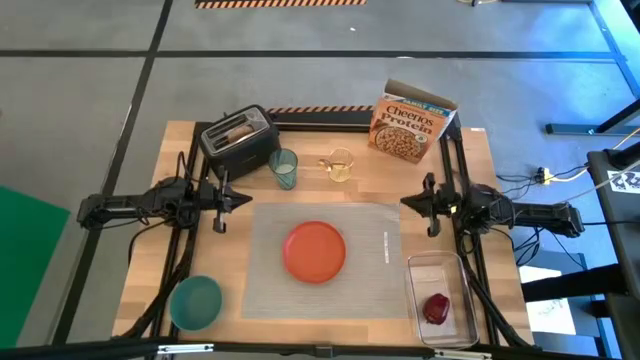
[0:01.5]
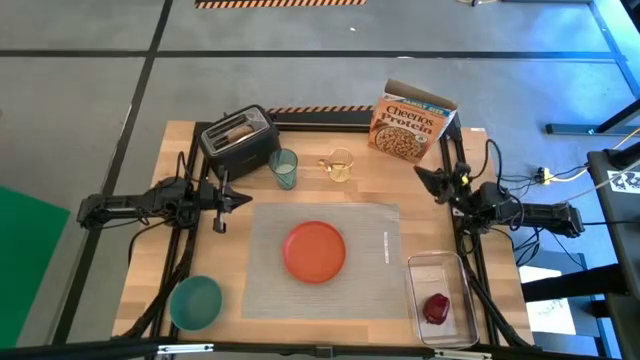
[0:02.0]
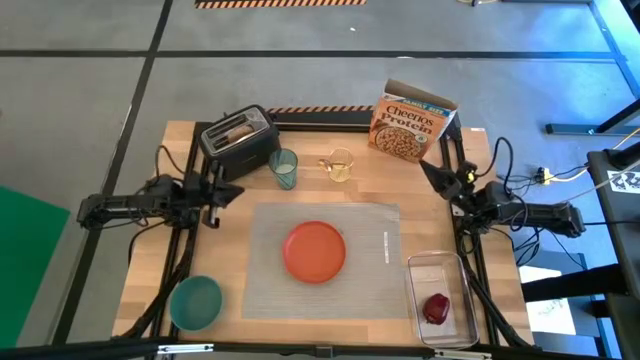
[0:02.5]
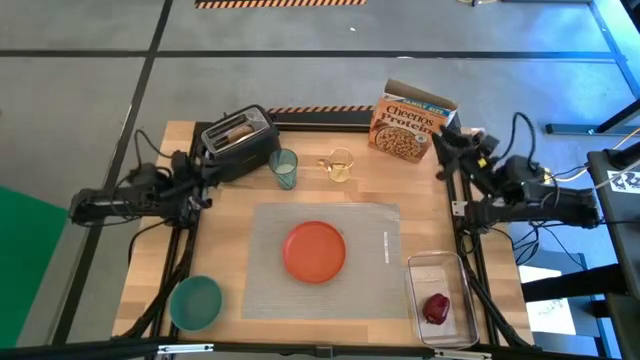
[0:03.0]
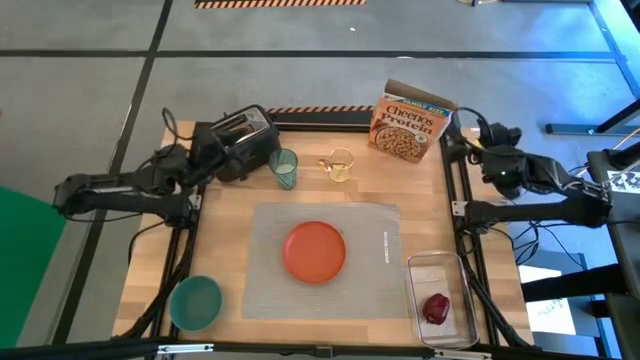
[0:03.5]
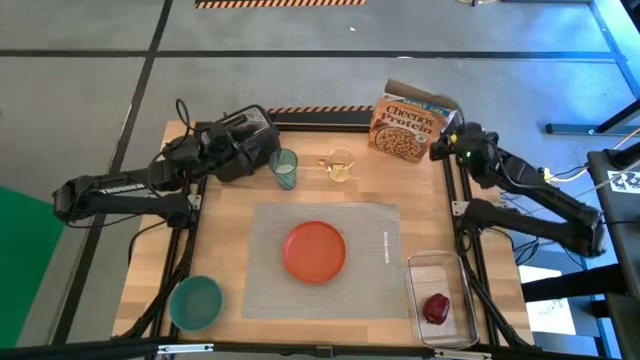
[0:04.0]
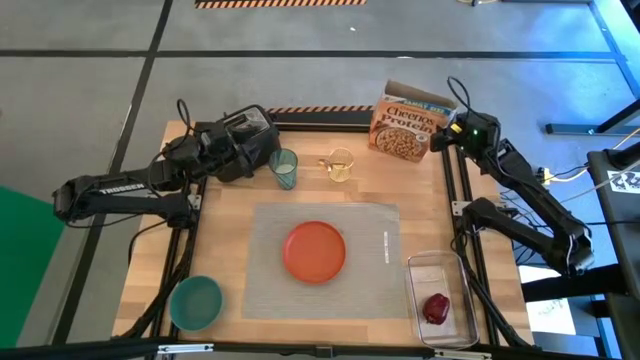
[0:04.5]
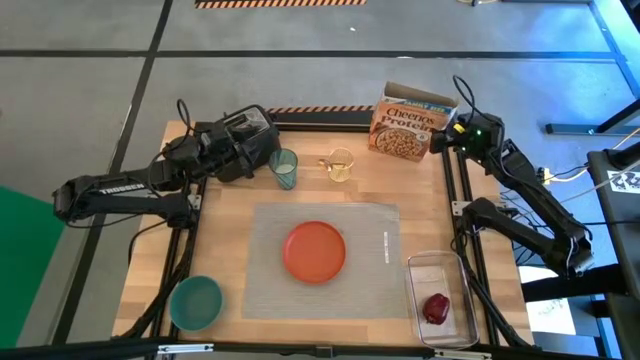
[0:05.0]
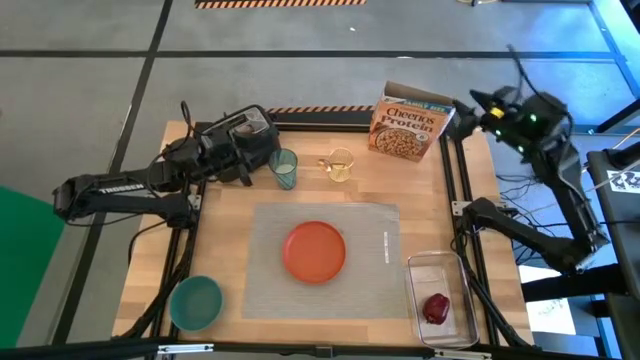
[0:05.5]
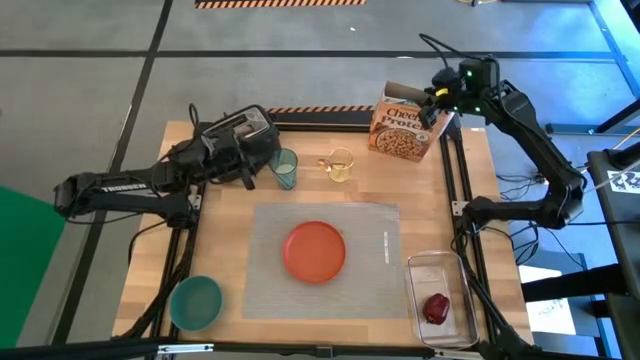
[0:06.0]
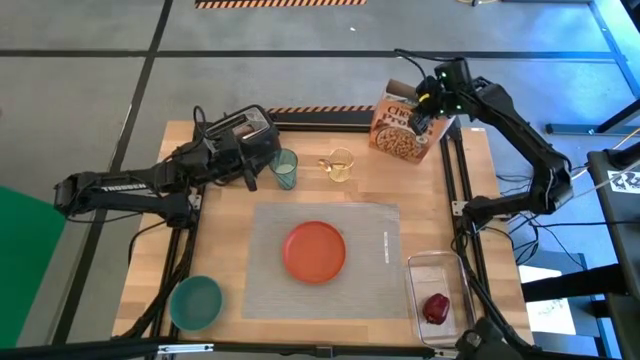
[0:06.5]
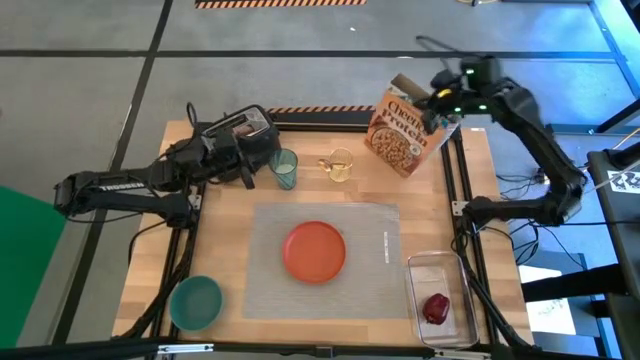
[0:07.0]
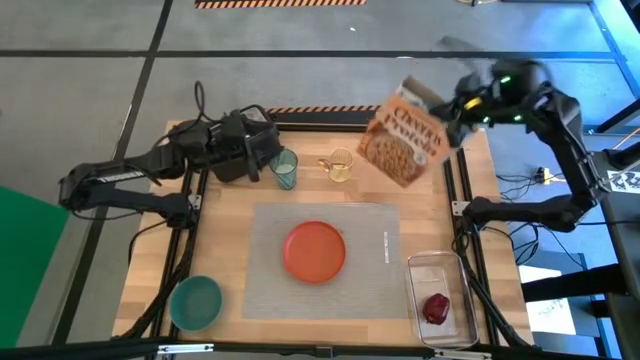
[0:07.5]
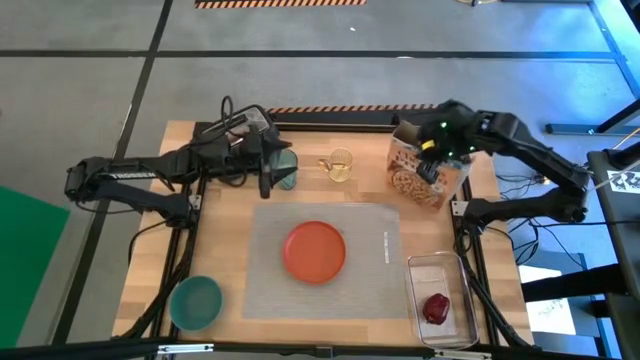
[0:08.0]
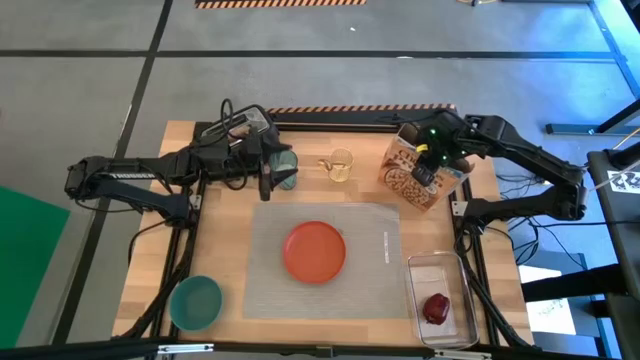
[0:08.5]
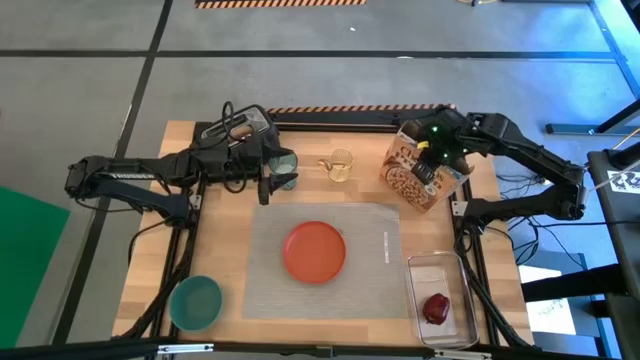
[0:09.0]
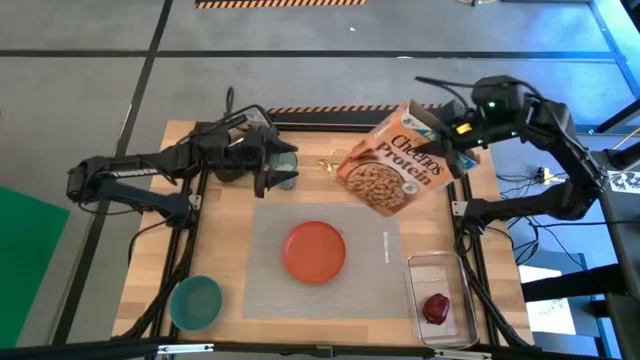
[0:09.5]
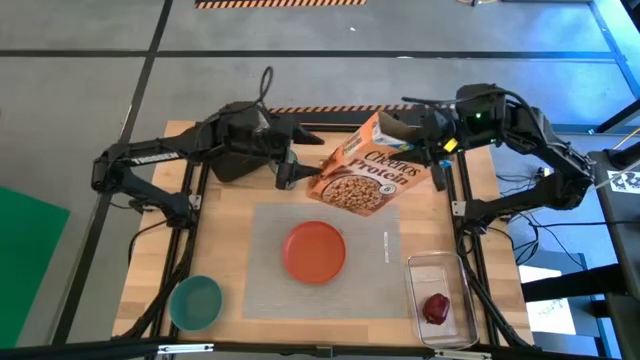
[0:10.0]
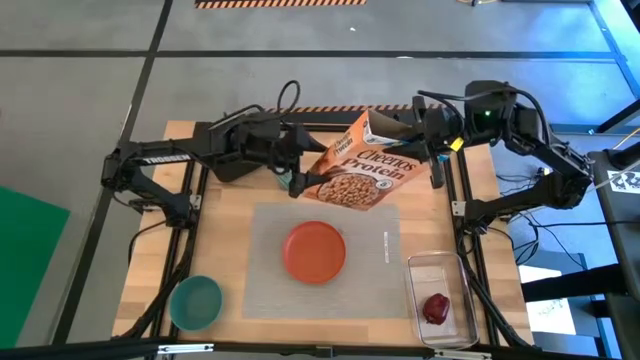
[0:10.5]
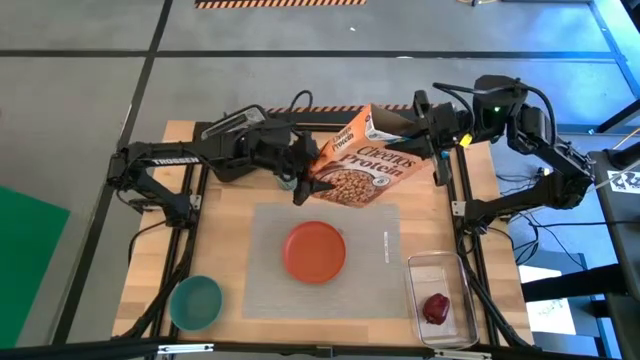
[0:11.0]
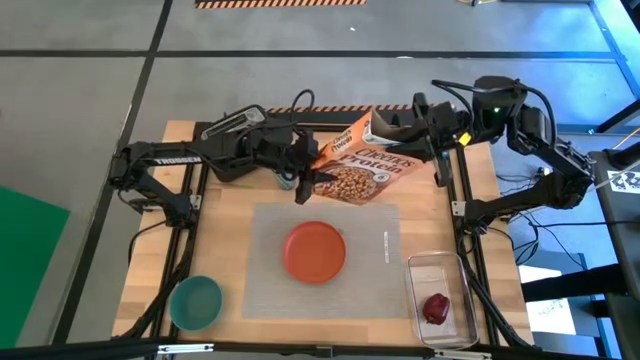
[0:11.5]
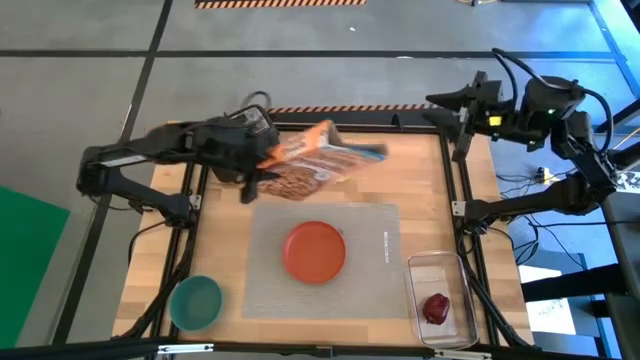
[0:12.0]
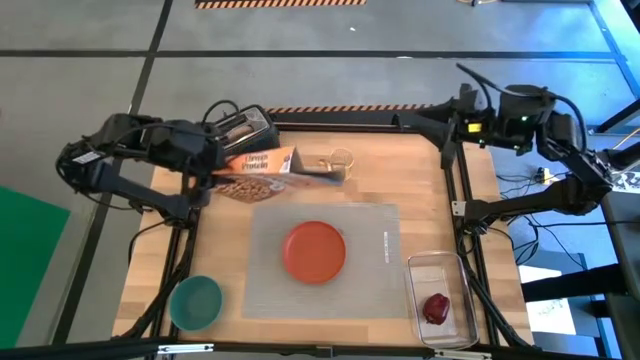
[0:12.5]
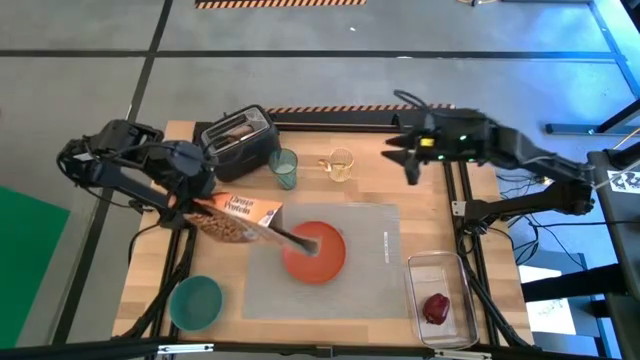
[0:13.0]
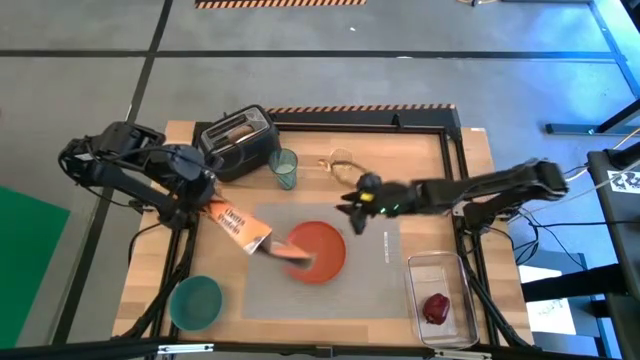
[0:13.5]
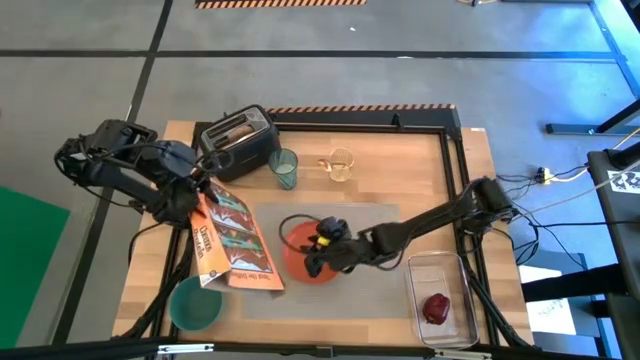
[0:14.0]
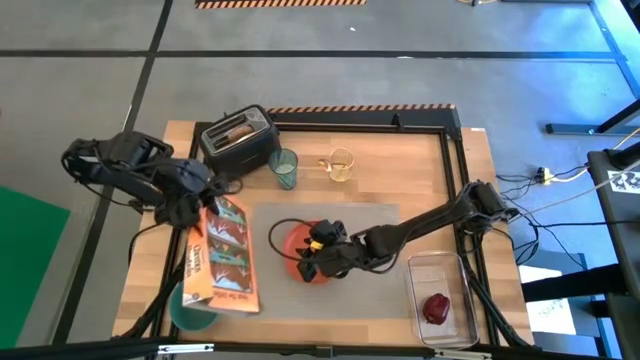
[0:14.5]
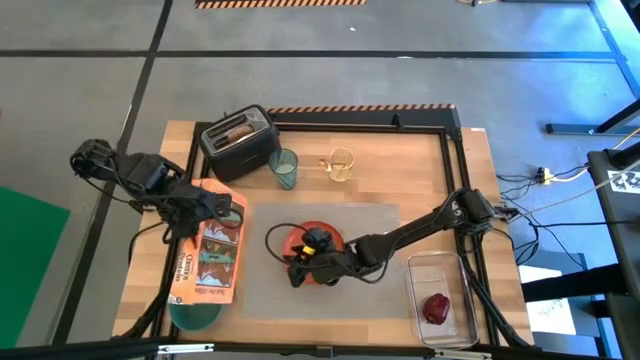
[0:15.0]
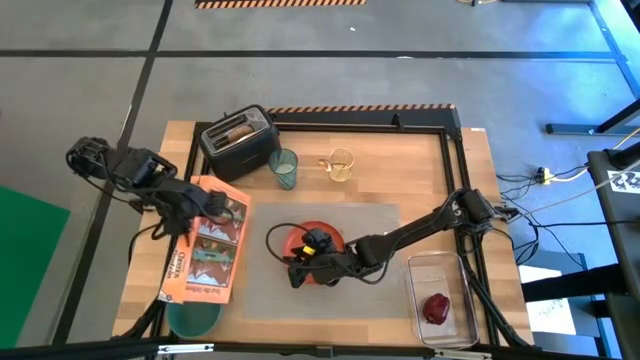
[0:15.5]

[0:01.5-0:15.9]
Task: Arrange a breakfast setting
Pour the cereal into the green bowl

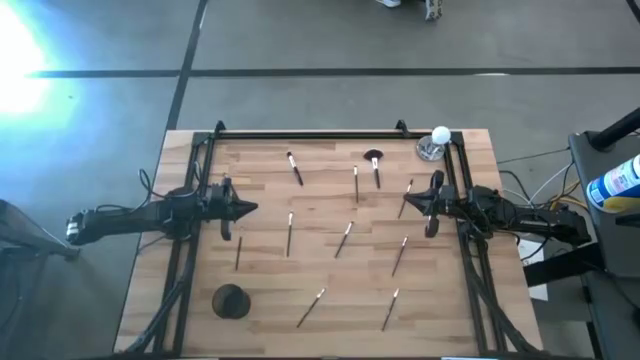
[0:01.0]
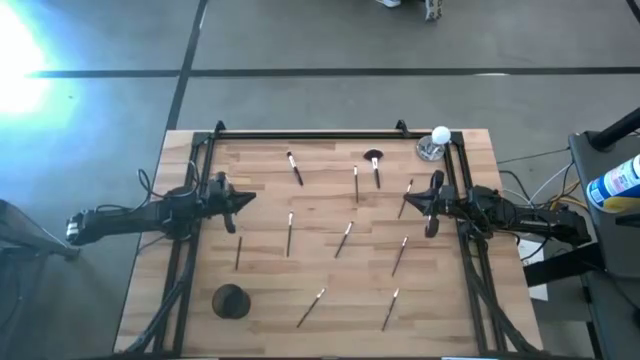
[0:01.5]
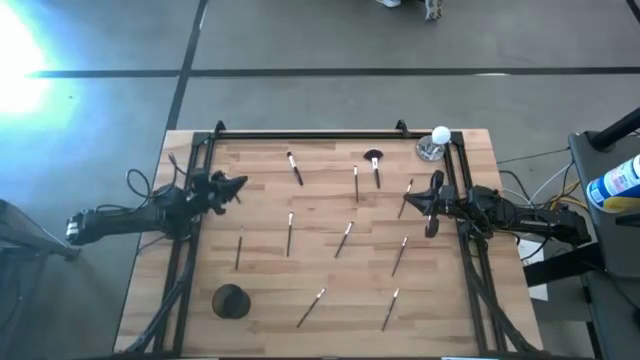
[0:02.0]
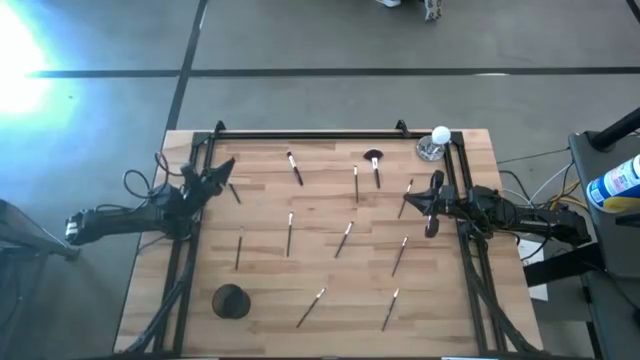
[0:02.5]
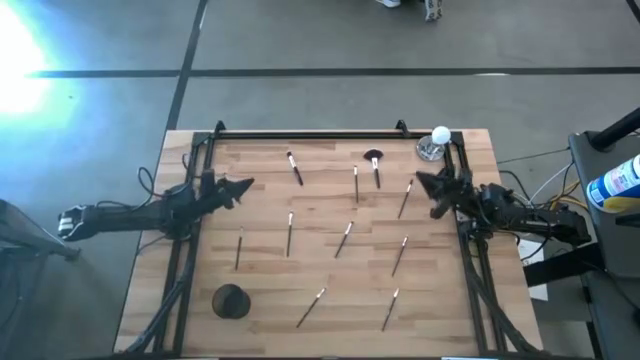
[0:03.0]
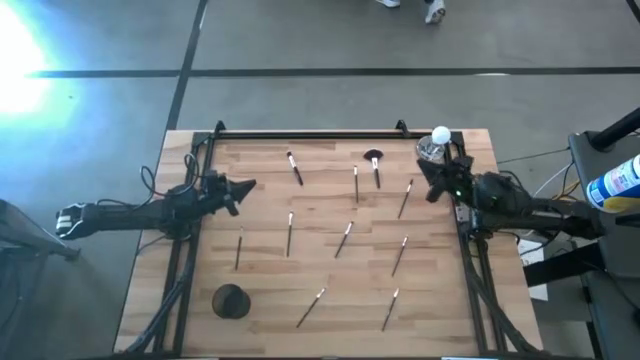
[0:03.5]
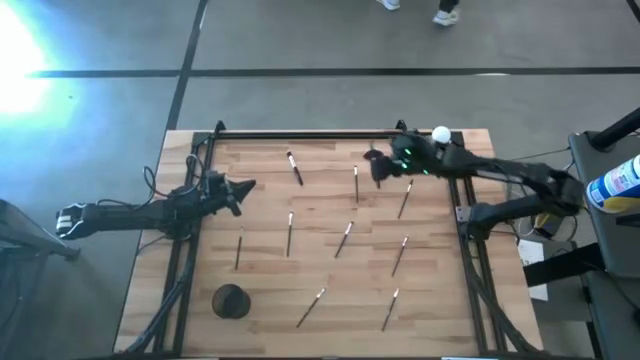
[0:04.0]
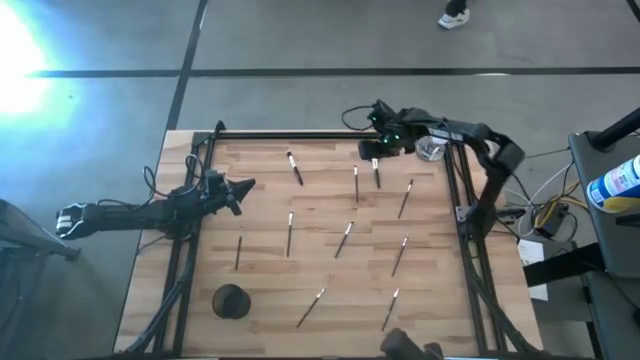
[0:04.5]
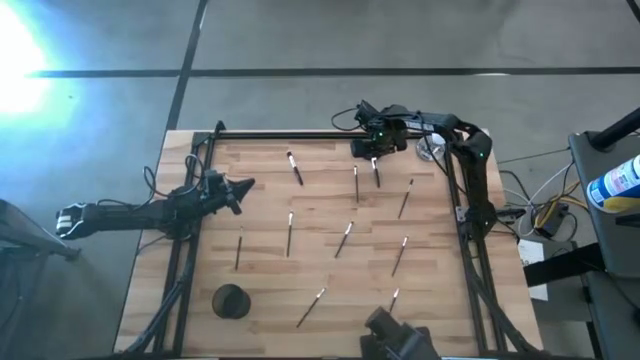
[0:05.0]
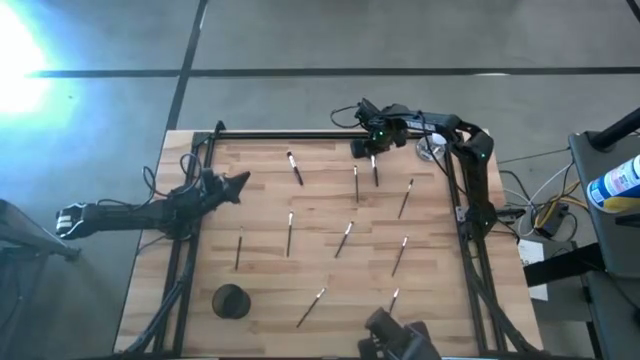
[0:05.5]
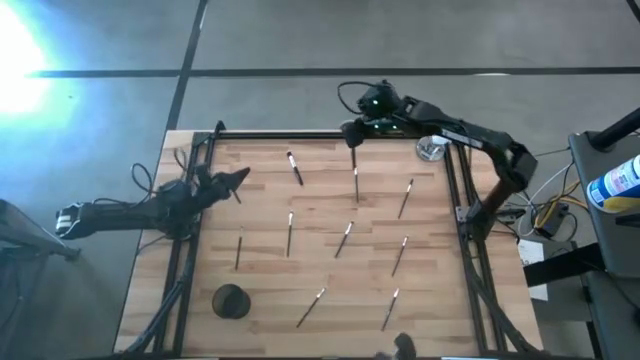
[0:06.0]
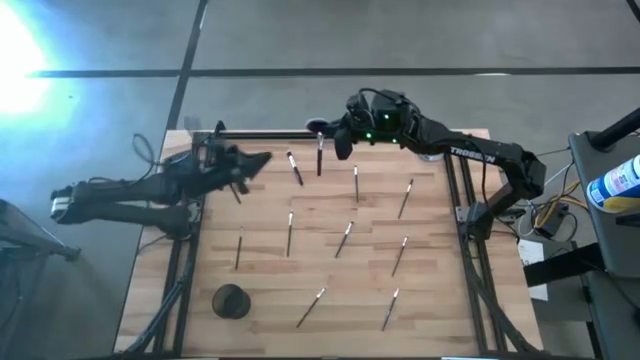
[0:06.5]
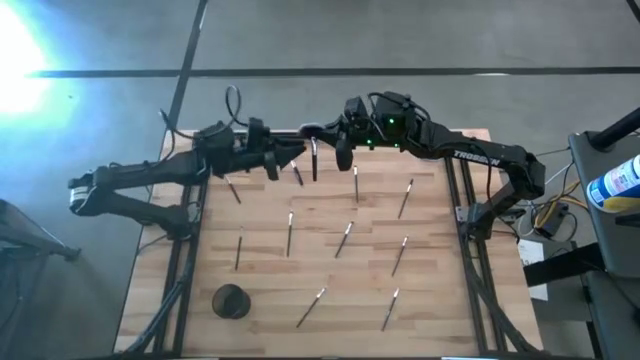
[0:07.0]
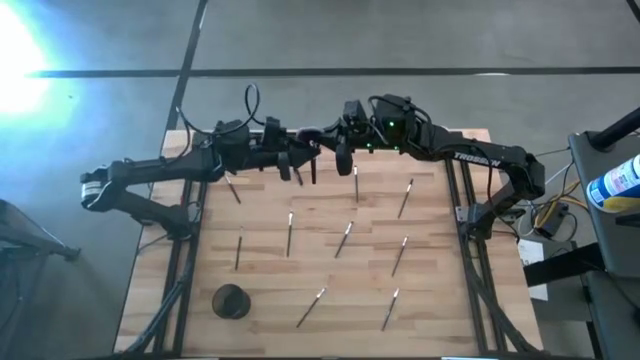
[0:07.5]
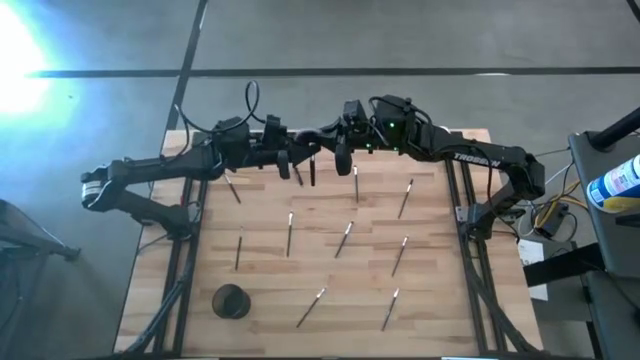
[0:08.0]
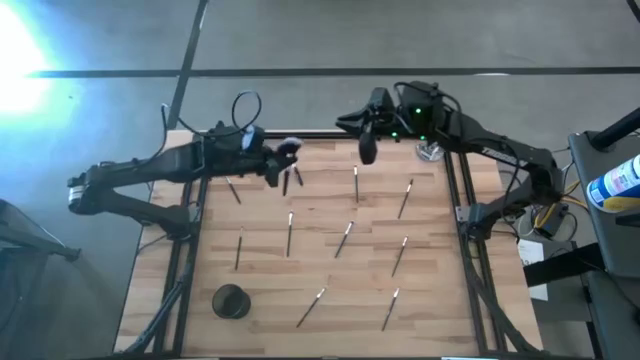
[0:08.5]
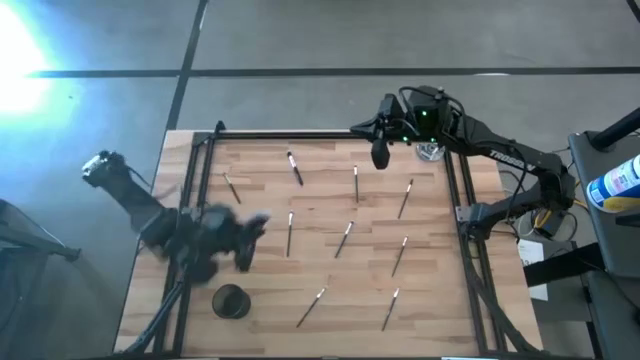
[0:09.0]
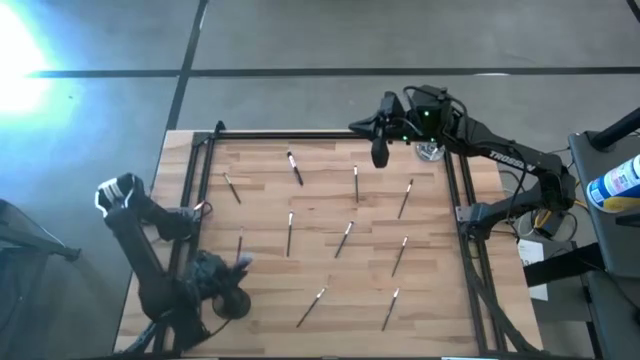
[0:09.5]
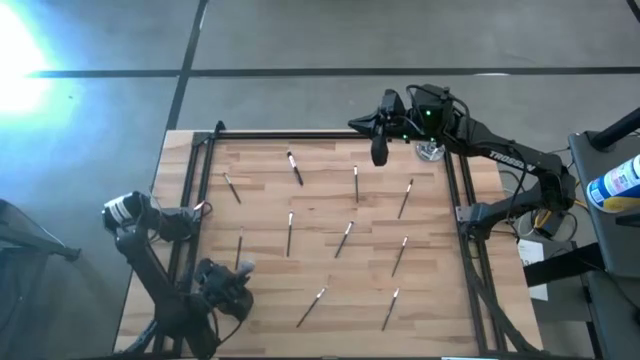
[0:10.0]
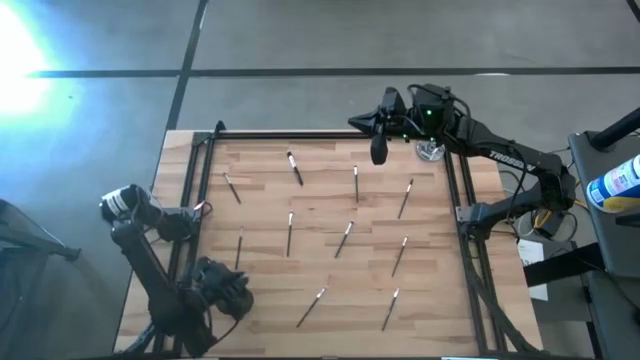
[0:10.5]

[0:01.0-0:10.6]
Task: Pick & Place Makeup Brushes
Put the highlighter brush into the holder
